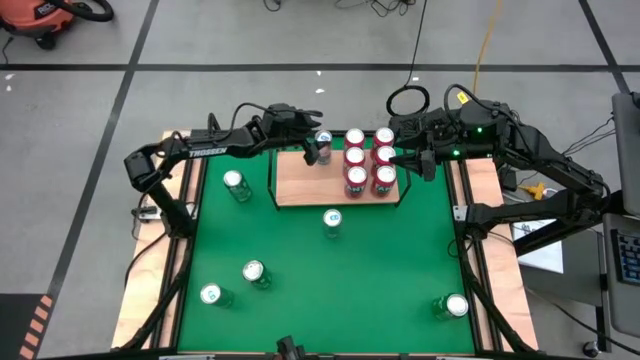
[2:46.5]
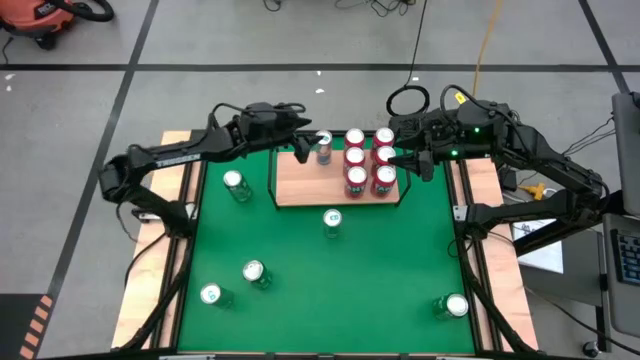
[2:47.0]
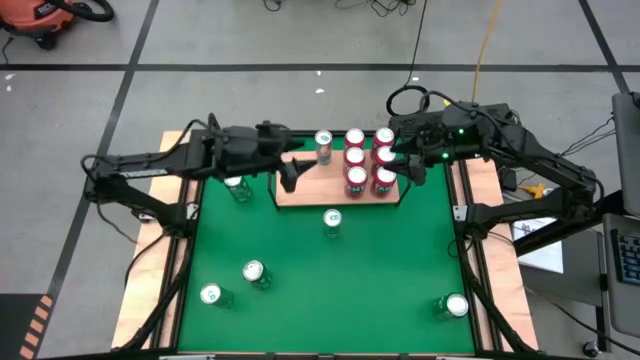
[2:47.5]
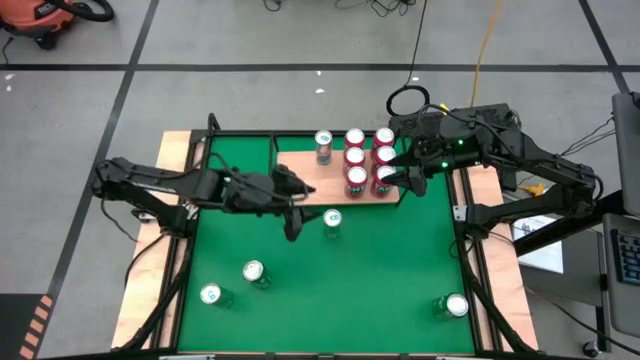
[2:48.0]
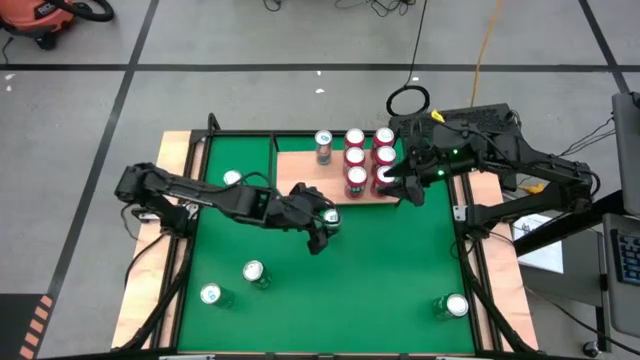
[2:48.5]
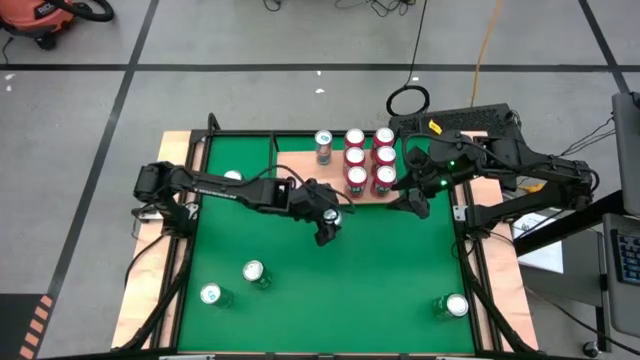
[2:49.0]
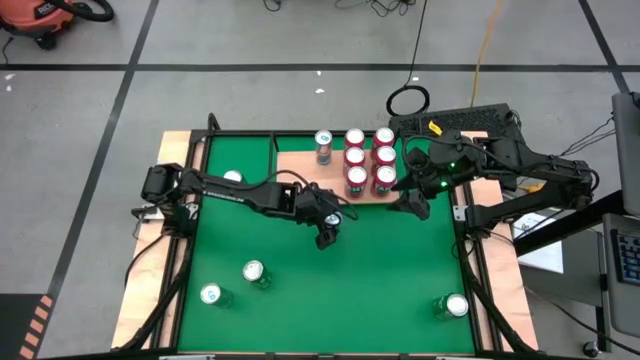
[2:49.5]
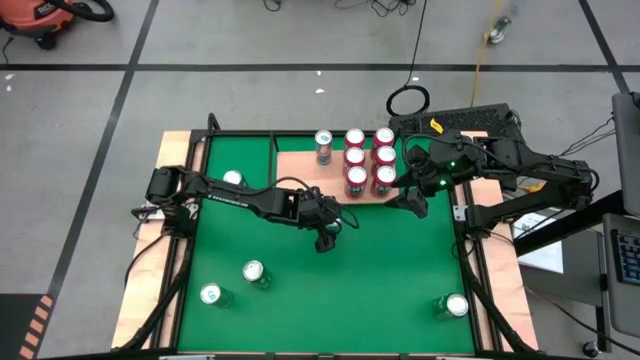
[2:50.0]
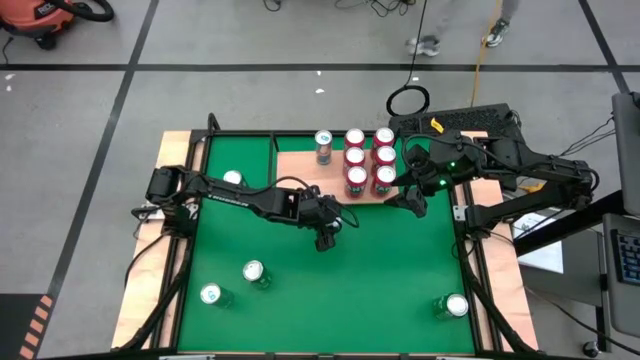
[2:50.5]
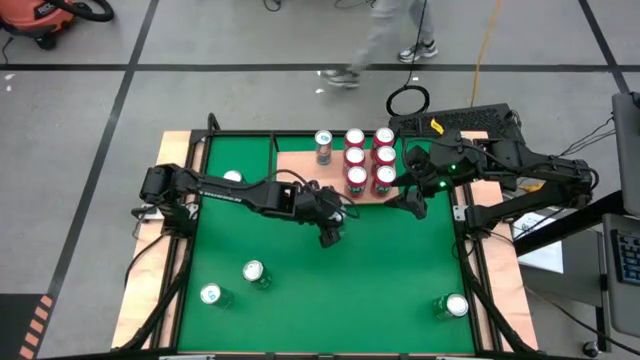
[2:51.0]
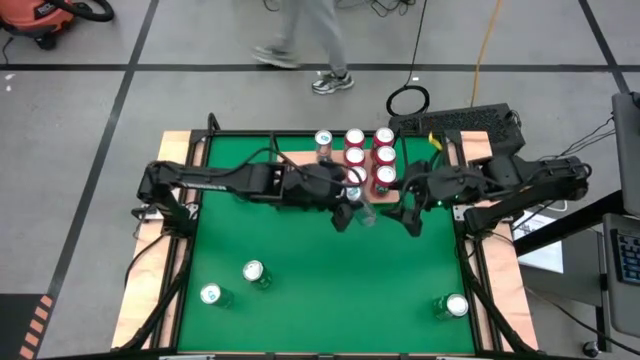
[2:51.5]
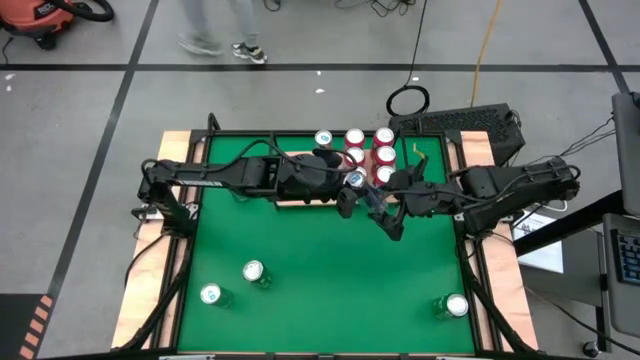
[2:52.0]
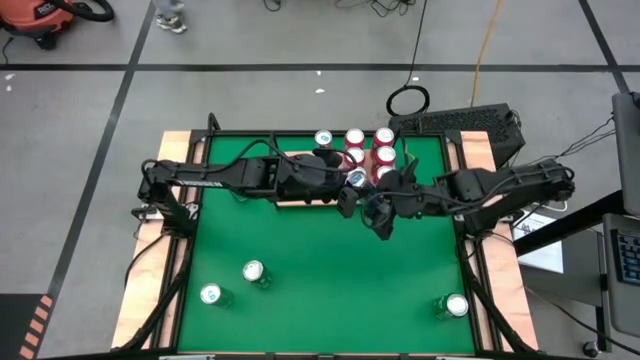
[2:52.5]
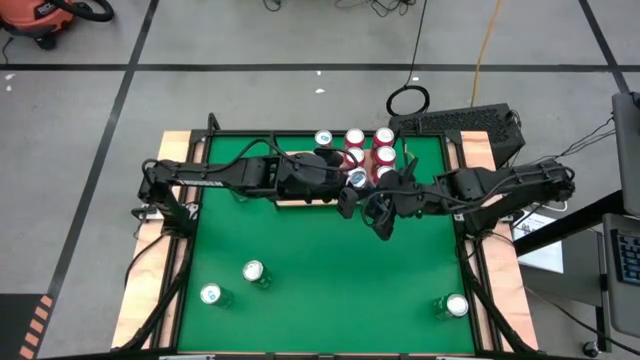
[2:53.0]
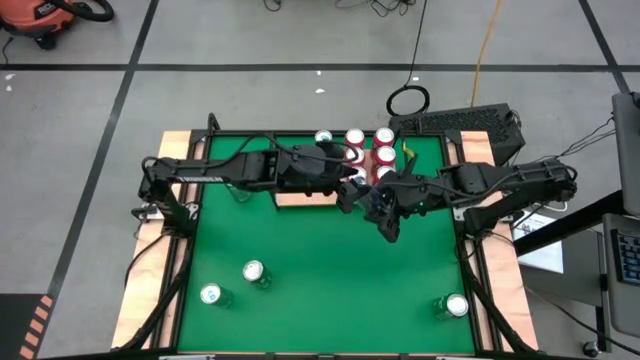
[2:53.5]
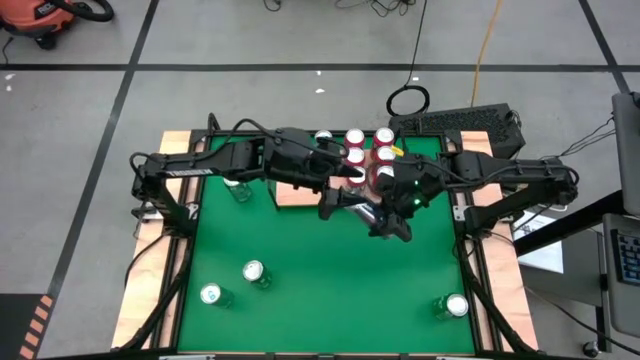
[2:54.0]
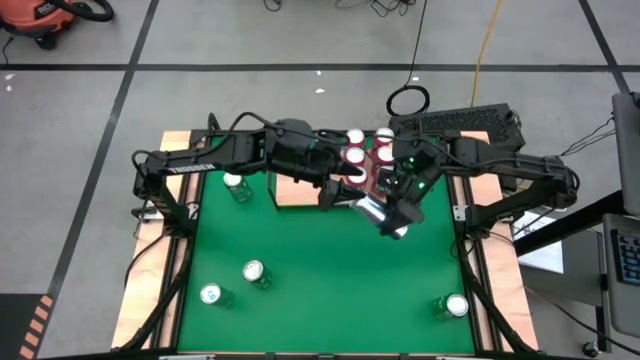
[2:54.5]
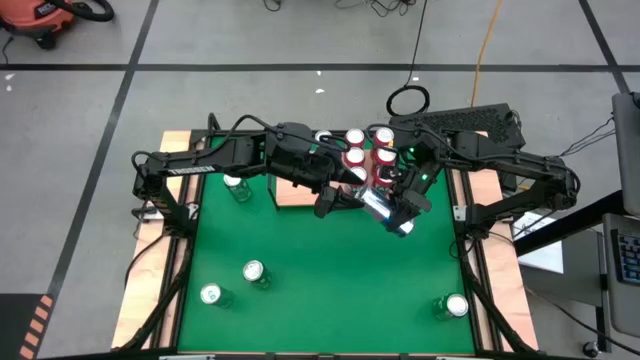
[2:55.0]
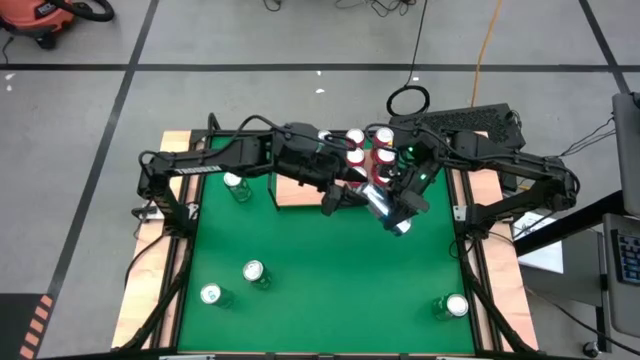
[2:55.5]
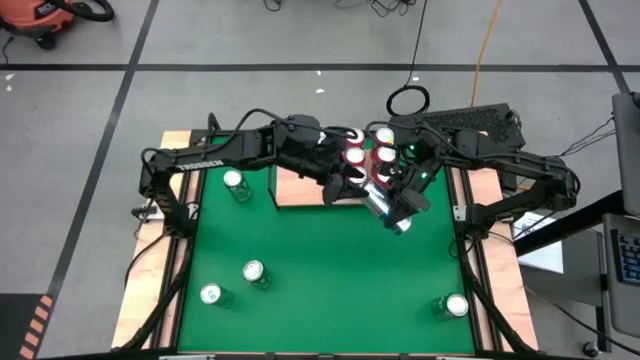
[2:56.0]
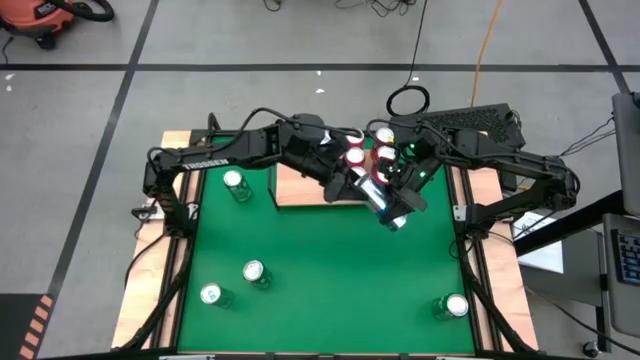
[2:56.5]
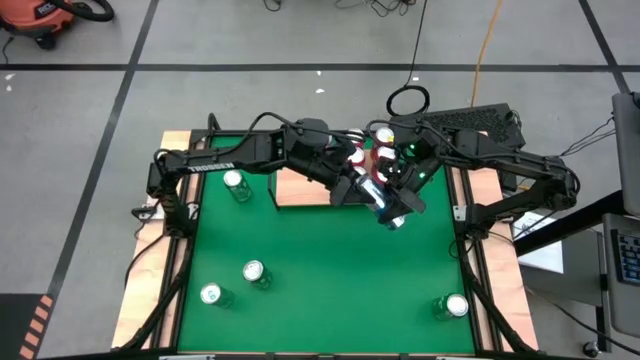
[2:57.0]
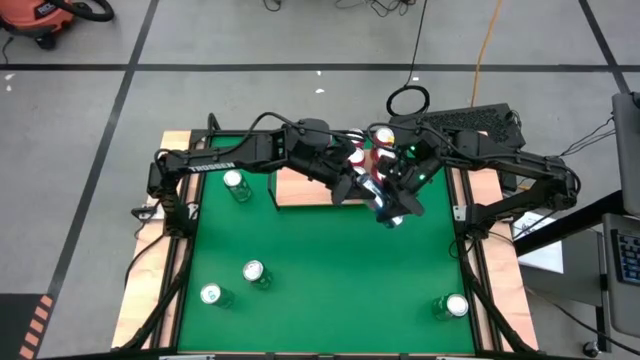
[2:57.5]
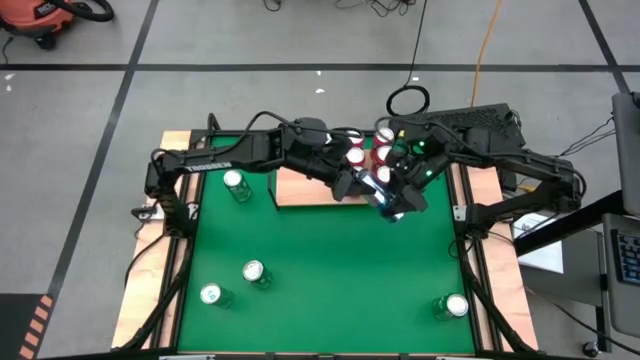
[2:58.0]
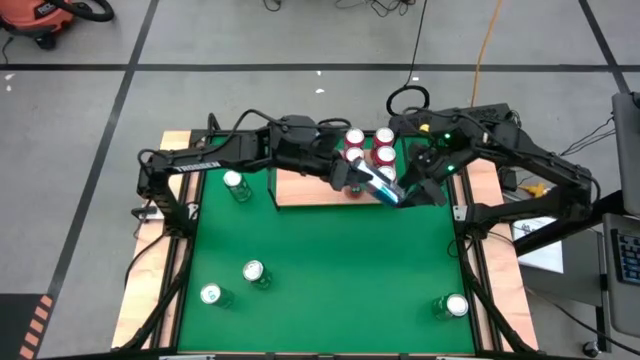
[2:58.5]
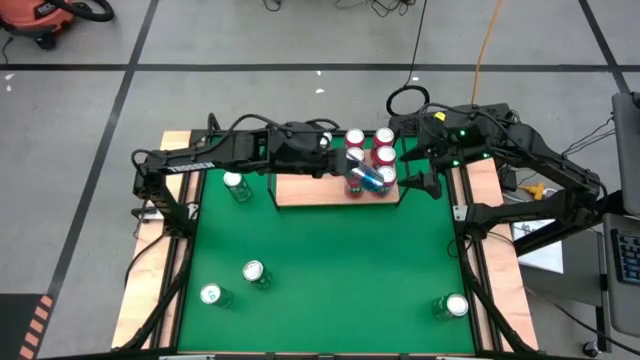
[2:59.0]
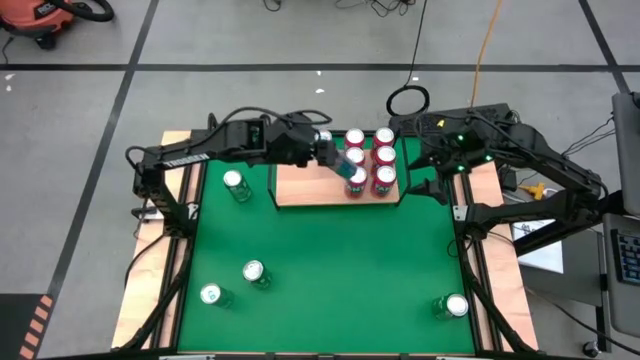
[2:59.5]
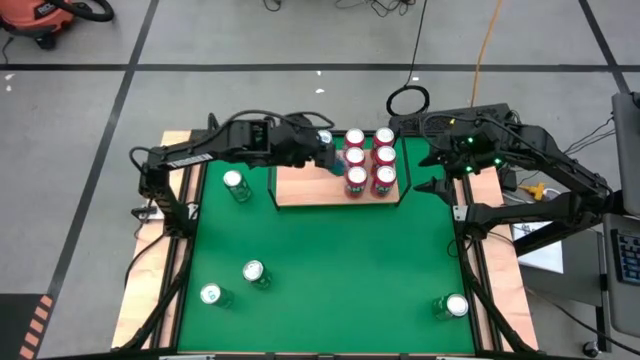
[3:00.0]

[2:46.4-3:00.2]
Task: Place canned beverage on shelf
Put the blue soda can on the shelf aligned with the other blue soda can on the shelf

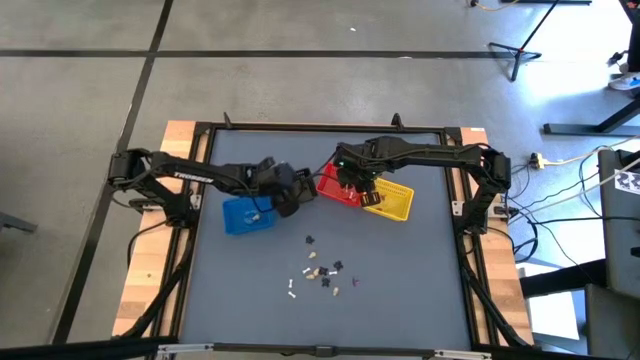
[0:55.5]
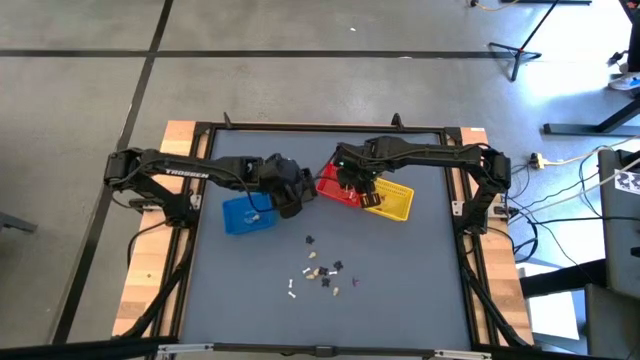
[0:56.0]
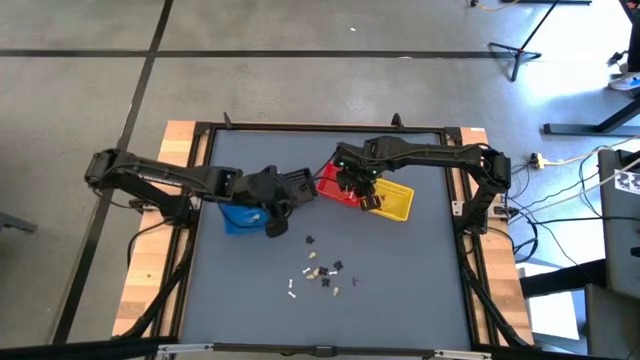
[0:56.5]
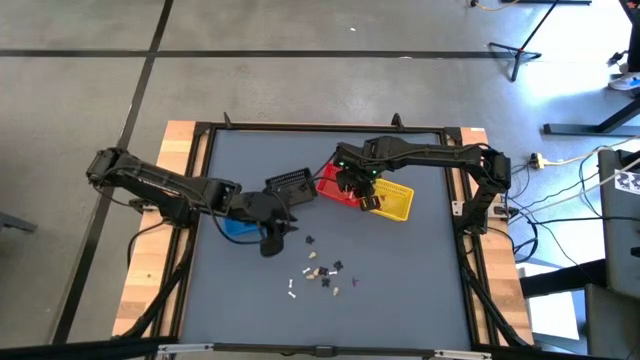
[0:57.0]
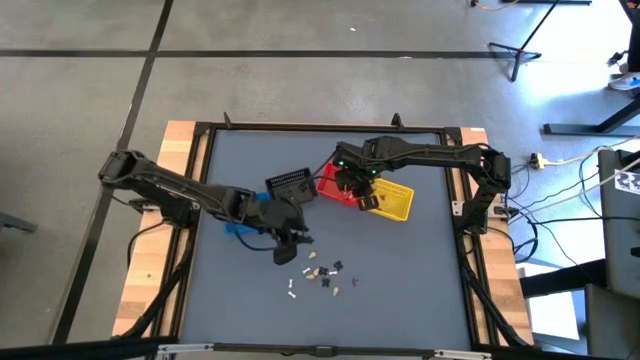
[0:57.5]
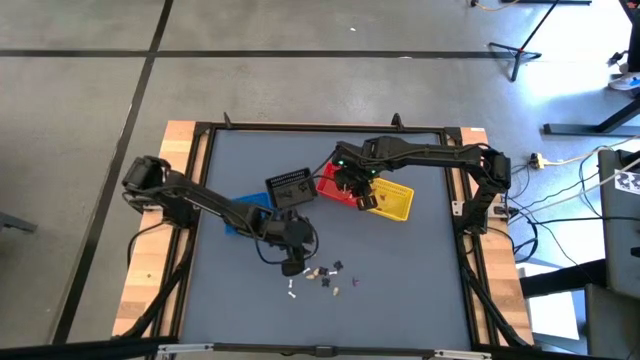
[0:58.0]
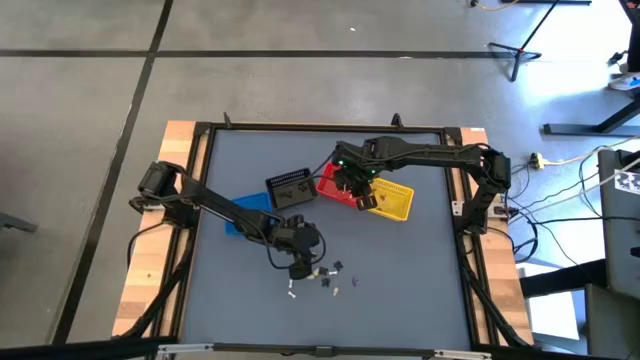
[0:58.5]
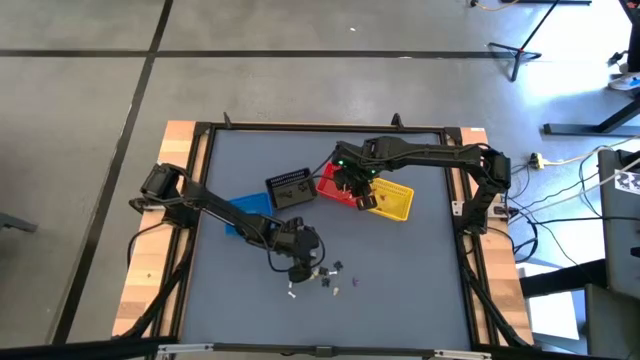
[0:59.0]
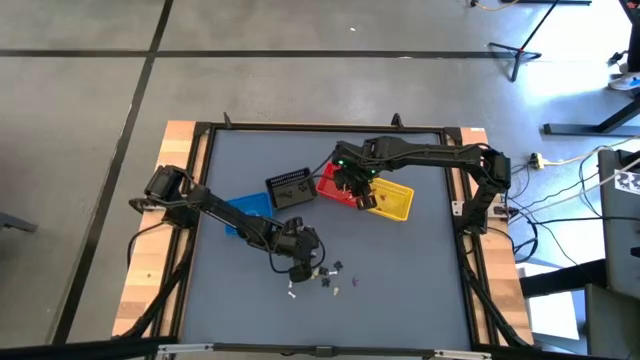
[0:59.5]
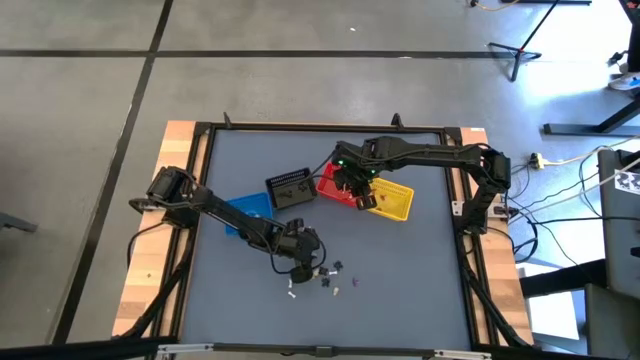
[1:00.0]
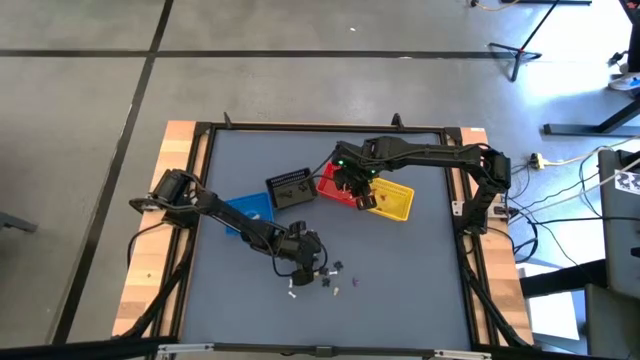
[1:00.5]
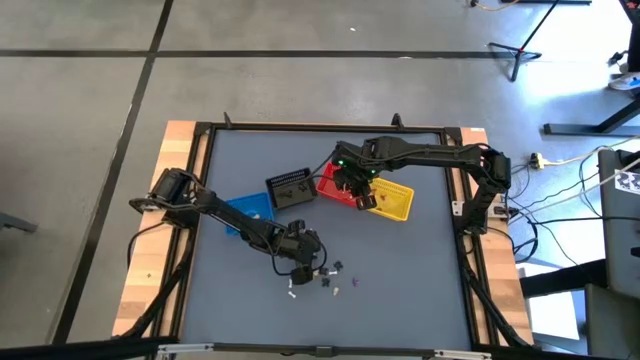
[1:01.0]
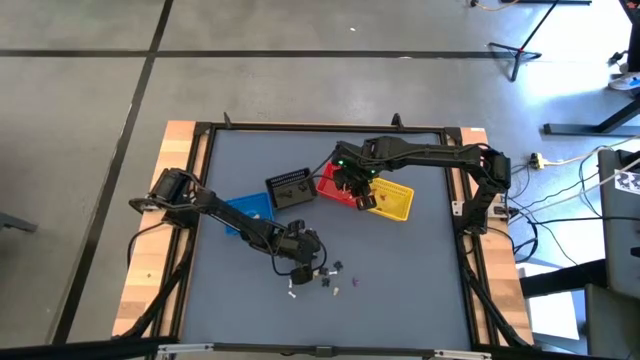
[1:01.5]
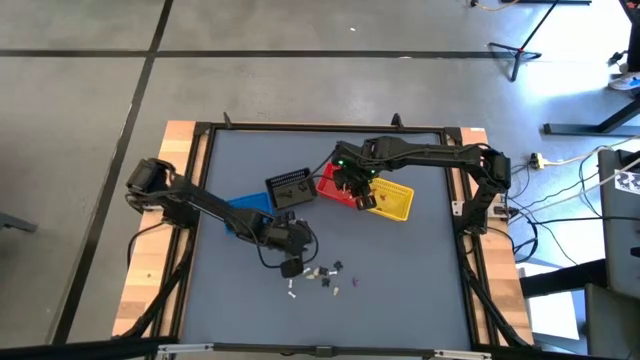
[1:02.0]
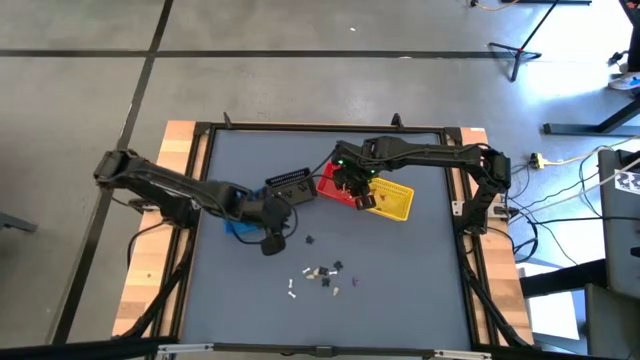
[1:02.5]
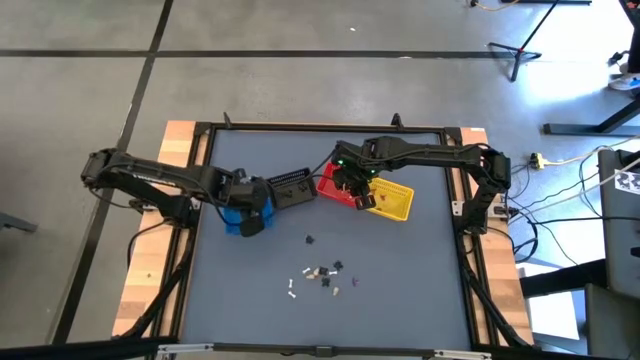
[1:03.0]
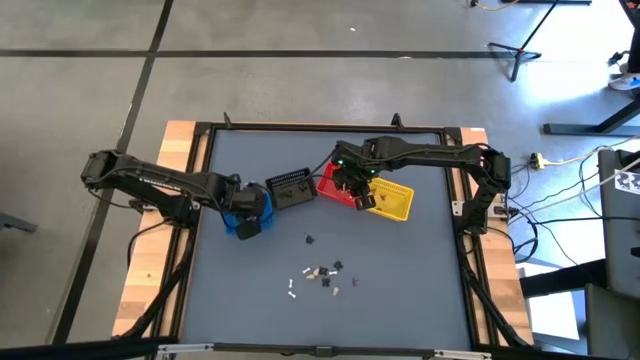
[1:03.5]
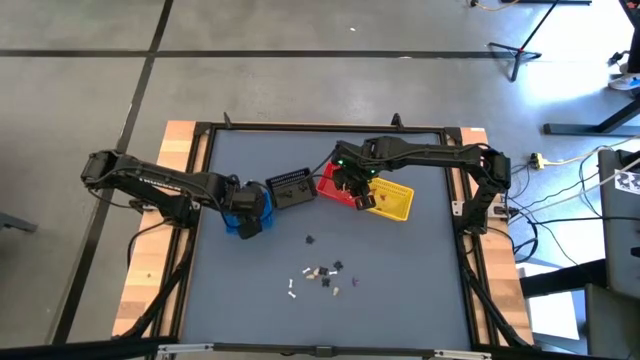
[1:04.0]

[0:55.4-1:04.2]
Task: Sort Halloween decoration
Put the yellow skull toy into the blue bin
